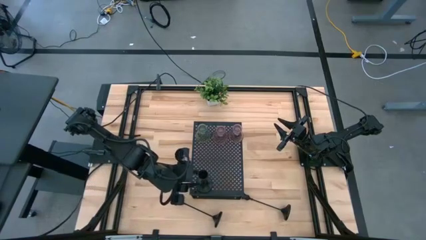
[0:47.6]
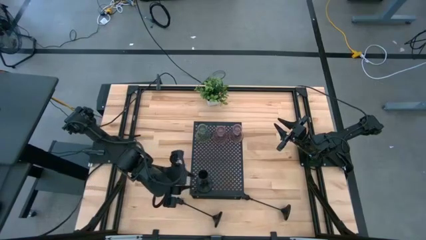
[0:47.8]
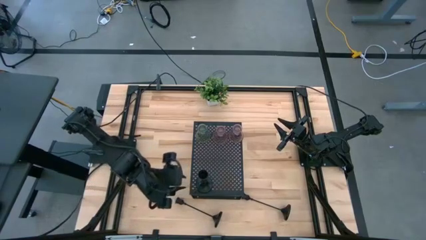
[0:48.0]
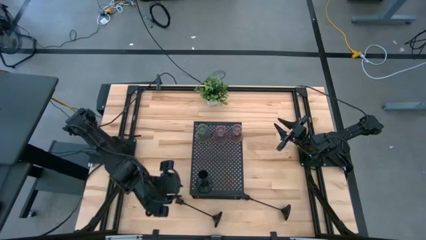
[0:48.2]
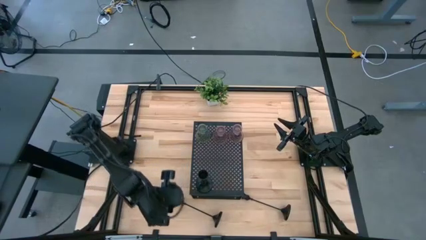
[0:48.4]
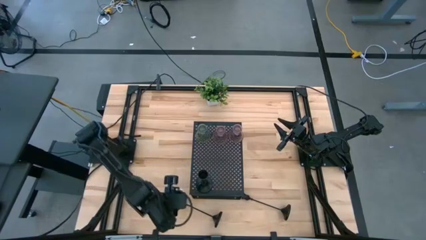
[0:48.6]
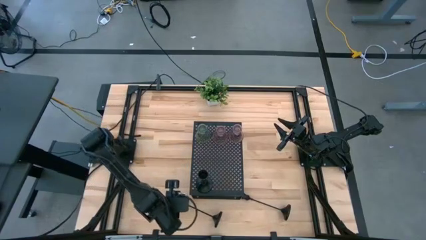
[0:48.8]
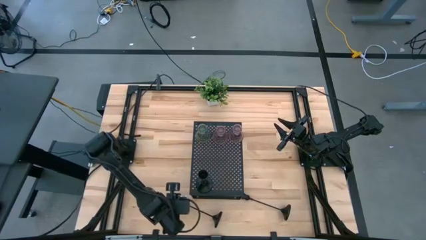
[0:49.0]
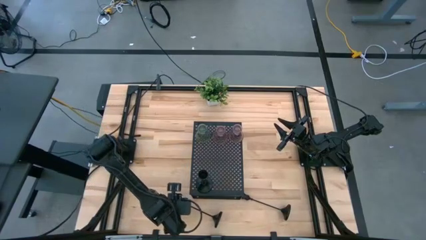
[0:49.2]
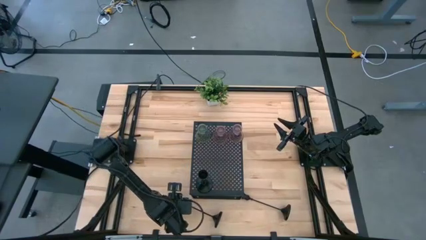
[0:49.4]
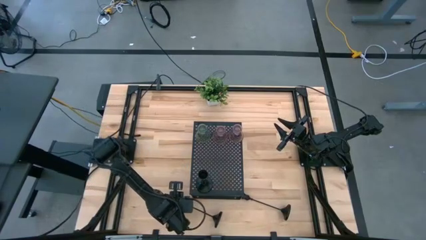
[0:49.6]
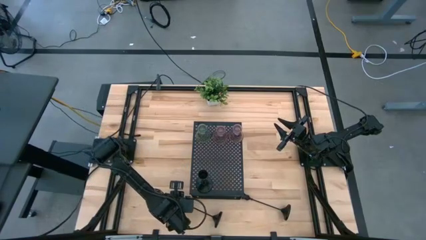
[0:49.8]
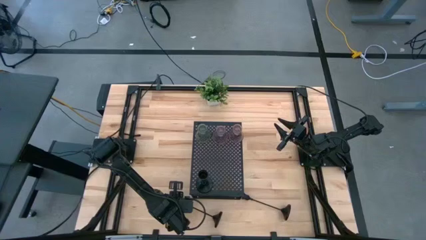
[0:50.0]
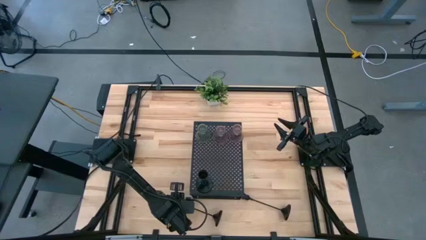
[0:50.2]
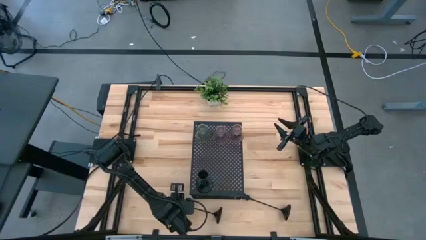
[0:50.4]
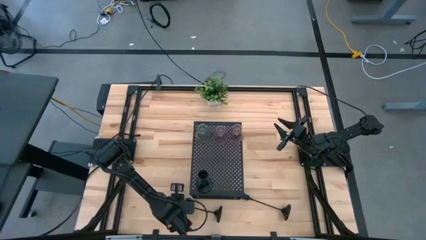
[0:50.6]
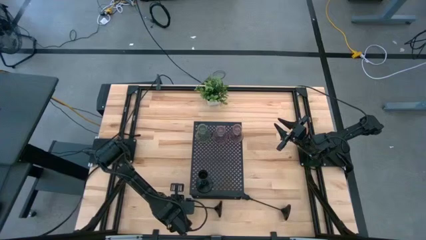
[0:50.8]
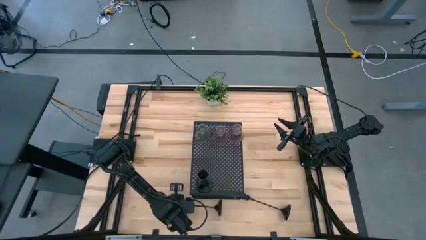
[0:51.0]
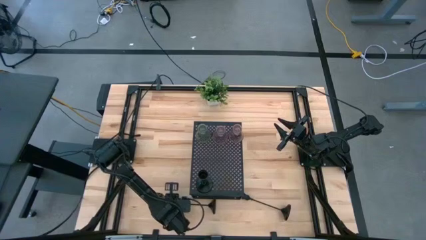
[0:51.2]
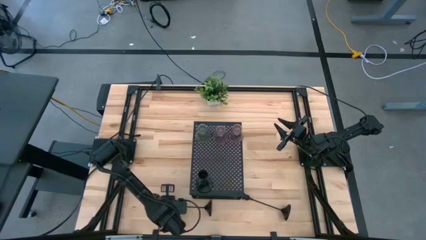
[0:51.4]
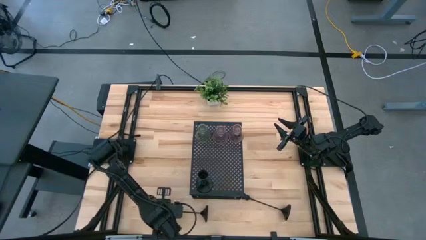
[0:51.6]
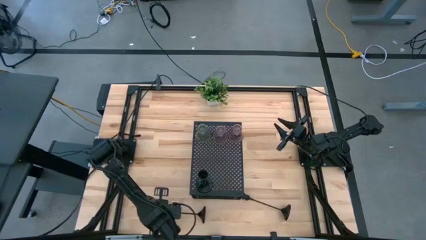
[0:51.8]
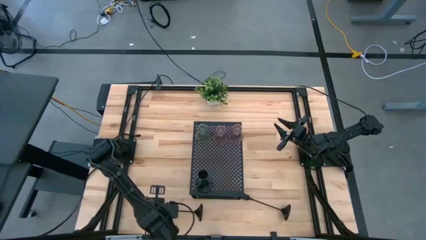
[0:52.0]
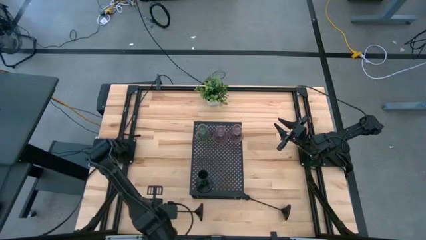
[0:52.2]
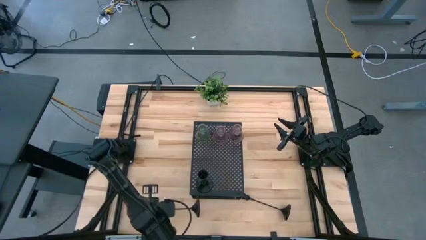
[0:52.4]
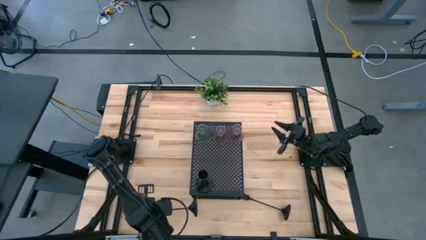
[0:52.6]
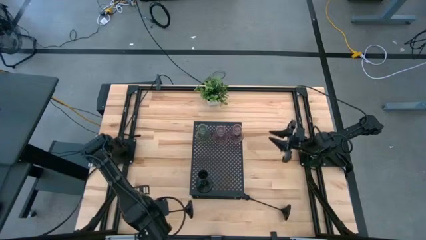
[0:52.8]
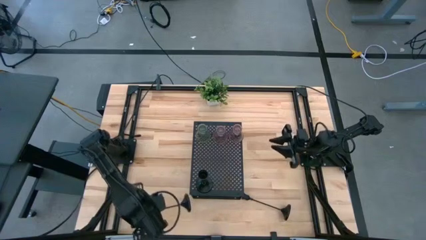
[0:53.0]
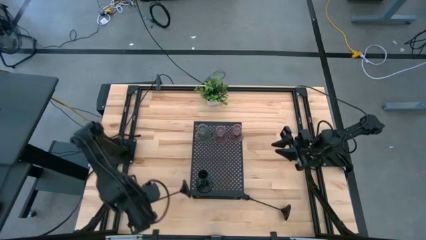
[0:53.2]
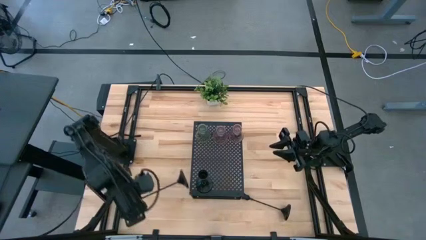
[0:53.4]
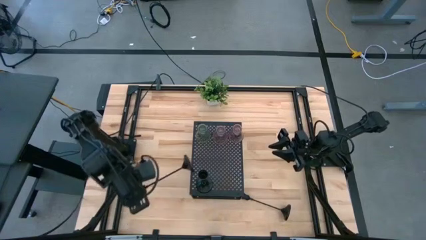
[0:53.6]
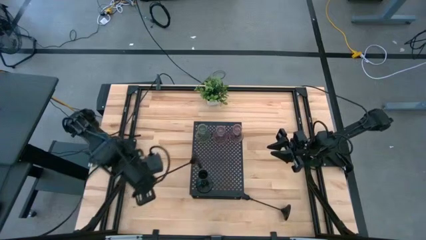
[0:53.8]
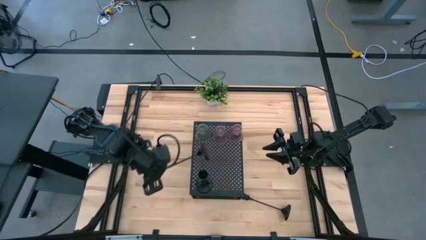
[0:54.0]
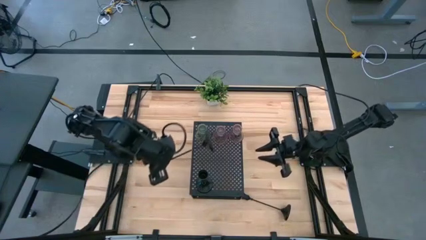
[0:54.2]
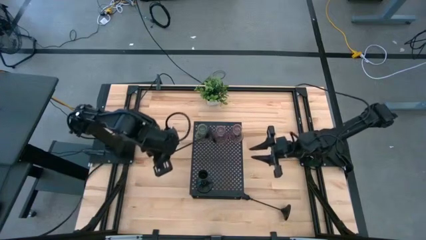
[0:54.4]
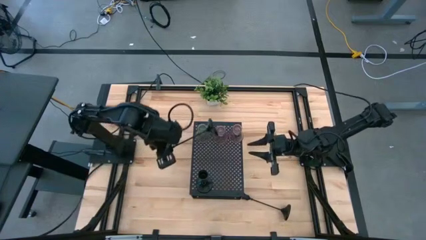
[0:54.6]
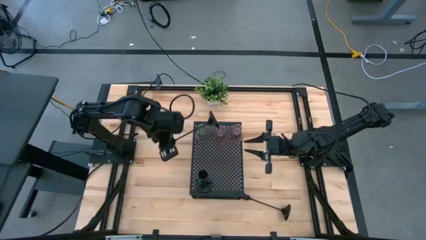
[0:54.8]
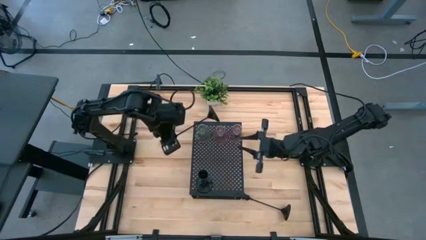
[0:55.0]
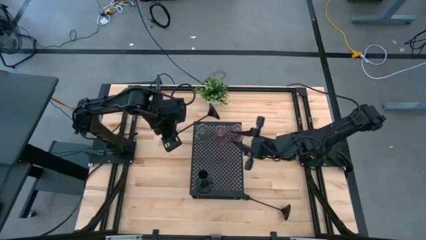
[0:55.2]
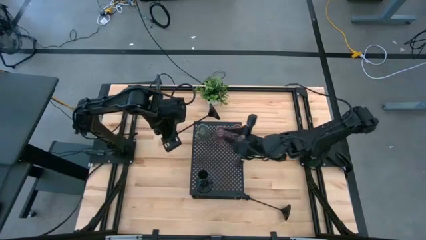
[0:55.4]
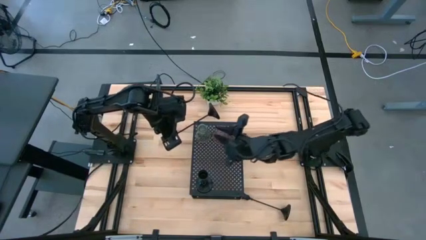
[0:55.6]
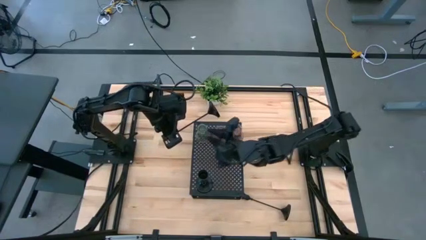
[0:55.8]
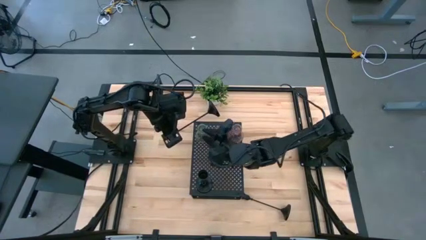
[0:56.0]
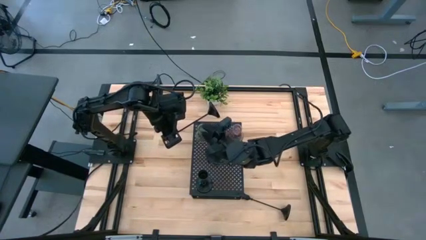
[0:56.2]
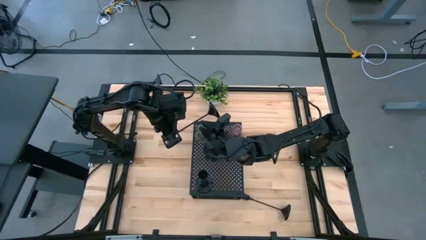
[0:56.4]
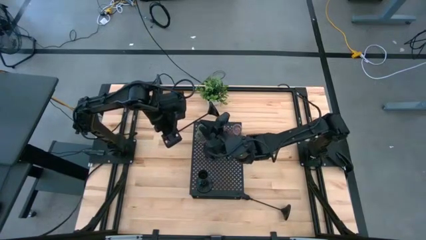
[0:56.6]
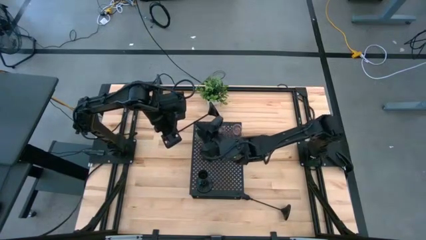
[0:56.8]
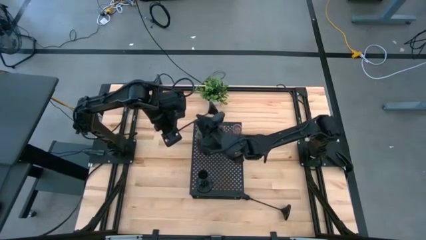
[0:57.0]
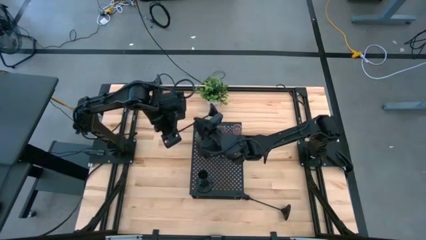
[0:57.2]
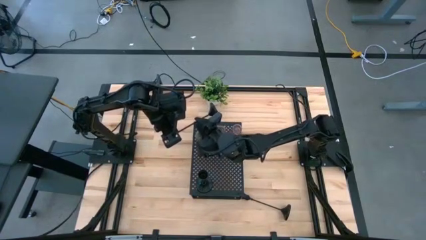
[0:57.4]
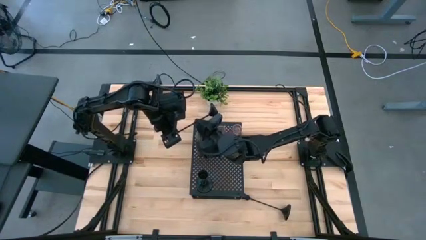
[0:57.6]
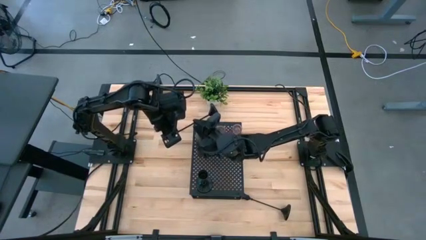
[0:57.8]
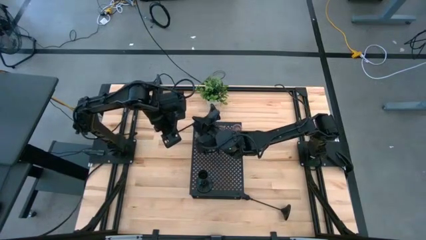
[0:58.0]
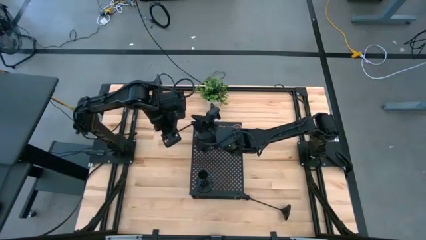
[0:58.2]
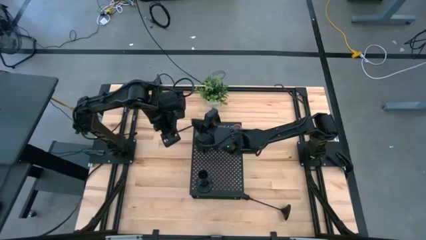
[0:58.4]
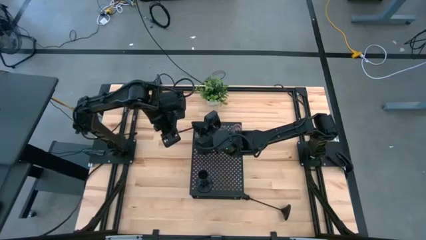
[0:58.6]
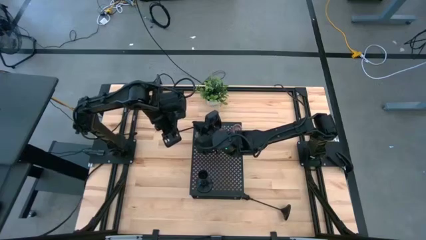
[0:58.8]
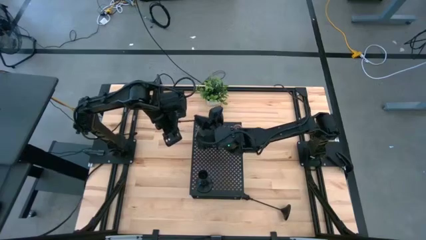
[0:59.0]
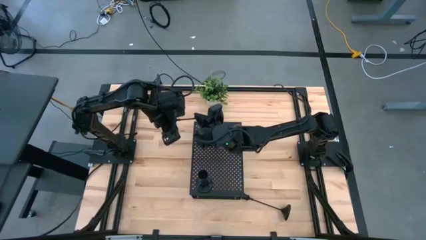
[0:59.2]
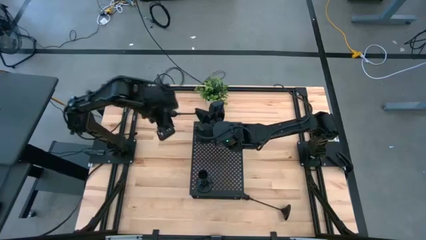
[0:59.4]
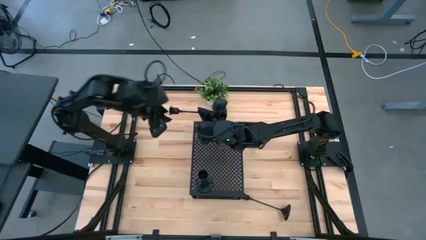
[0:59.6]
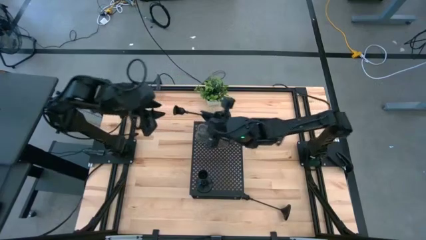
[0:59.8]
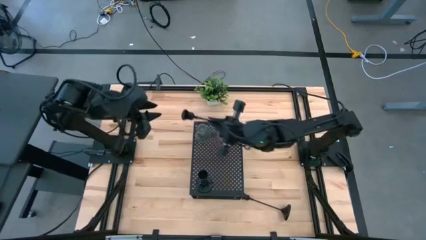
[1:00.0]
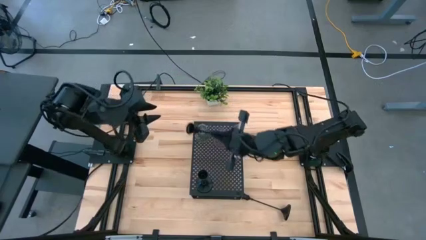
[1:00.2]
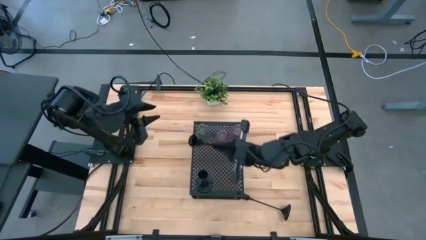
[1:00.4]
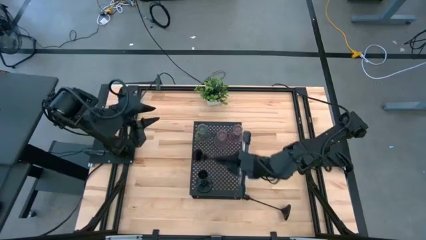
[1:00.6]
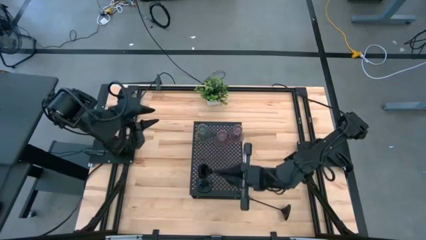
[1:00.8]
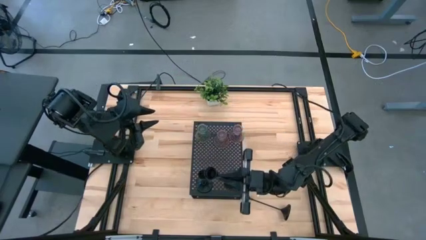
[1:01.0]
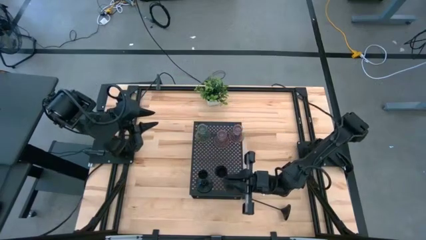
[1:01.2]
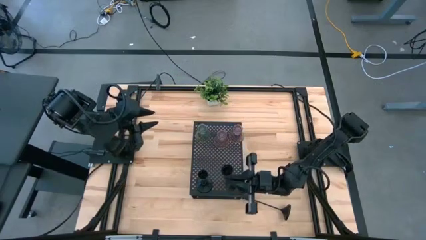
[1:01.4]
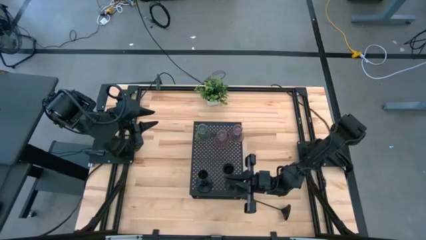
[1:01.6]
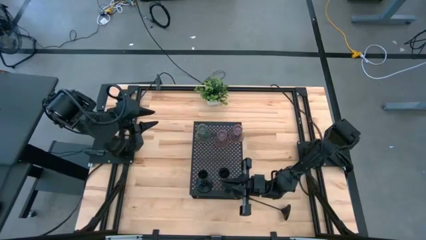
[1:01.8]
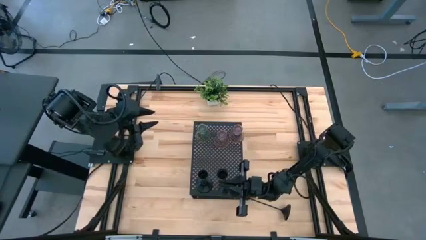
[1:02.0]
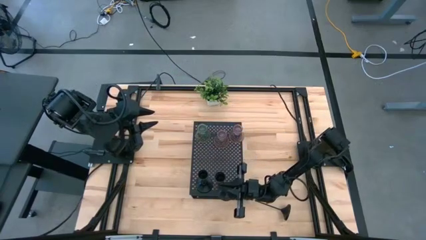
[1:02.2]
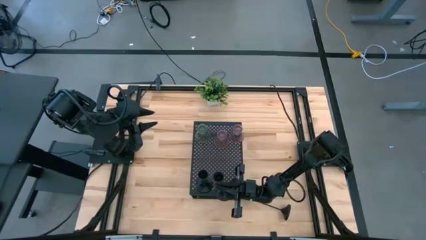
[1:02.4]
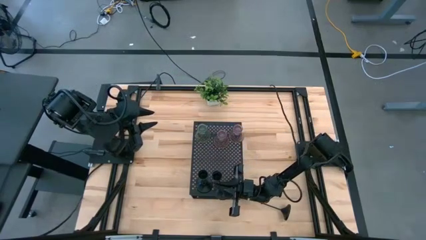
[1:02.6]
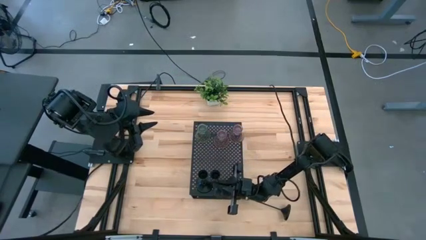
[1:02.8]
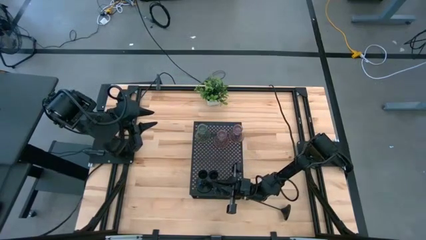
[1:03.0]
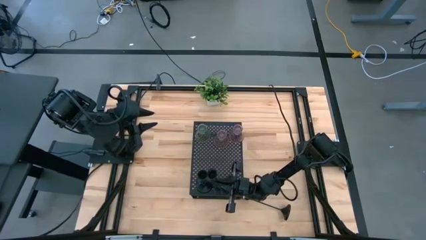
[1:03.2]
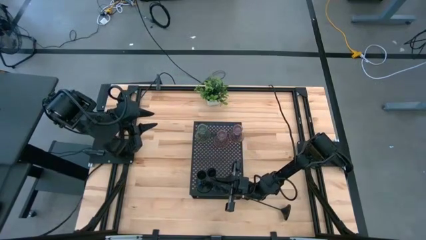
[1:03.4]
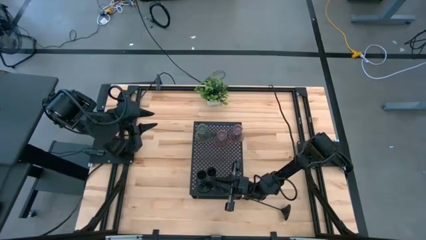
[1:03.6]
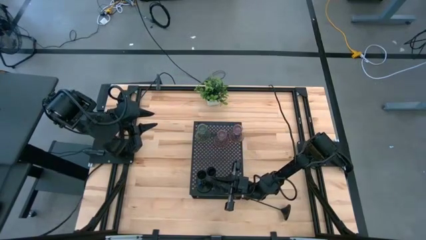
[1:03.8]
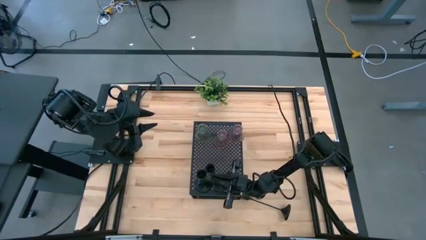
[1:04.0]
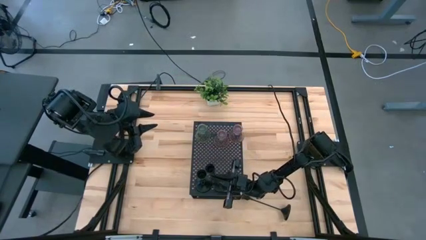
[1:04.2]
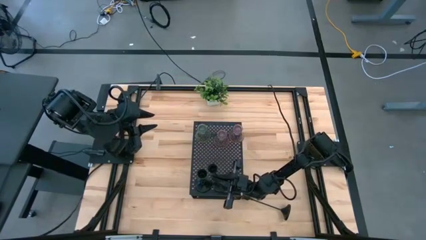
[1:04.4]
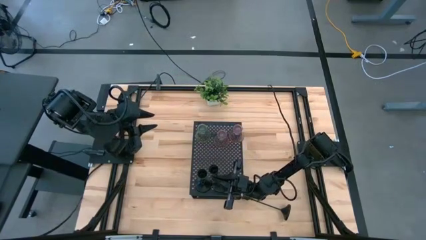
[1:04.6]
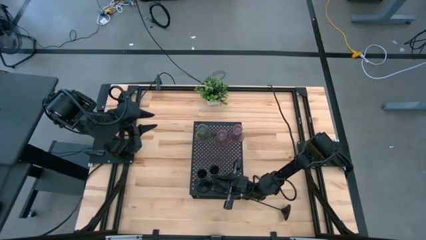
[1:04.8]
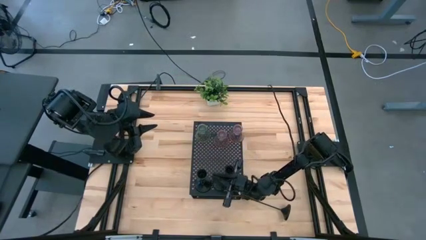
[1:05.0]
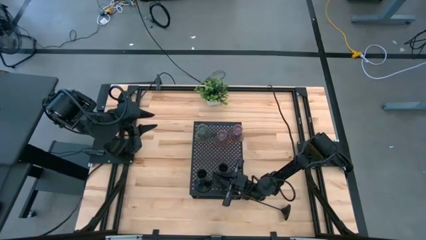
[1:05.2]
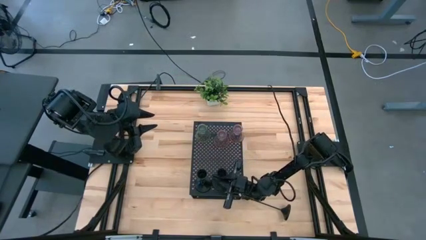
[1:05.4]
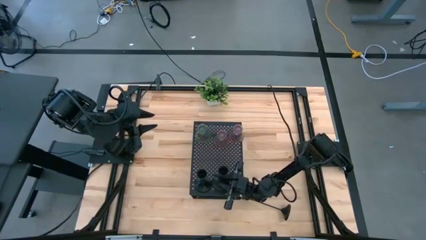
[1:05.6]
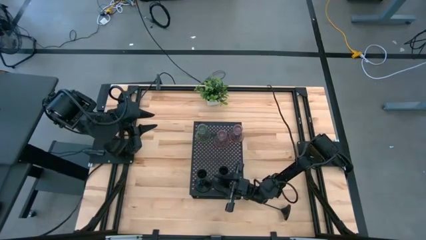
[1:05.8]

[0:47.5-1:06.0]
Task: Pick & Place candle stick holders
Align the left black candle holder with the black candle holder on the shelf
